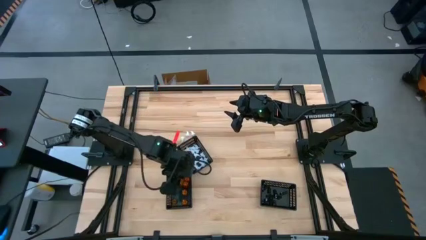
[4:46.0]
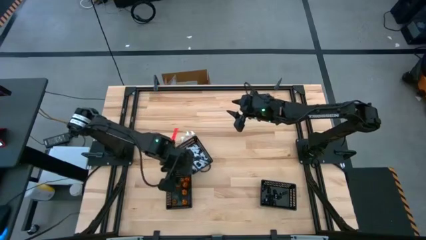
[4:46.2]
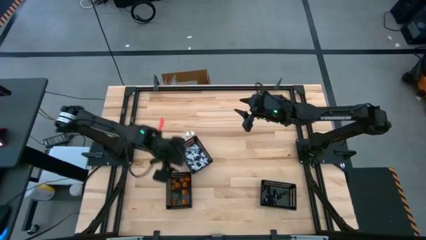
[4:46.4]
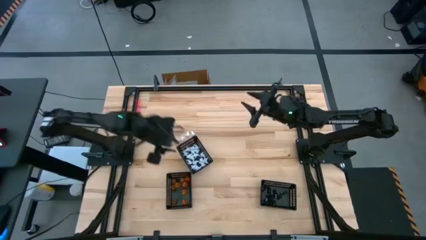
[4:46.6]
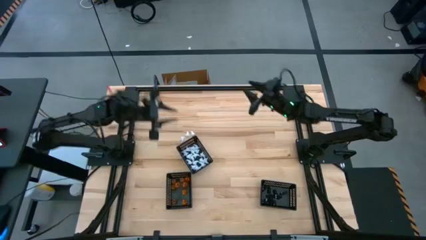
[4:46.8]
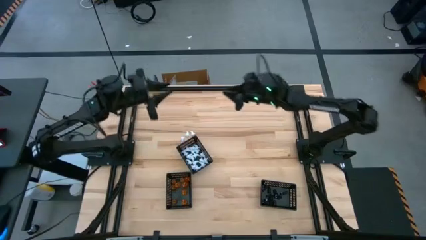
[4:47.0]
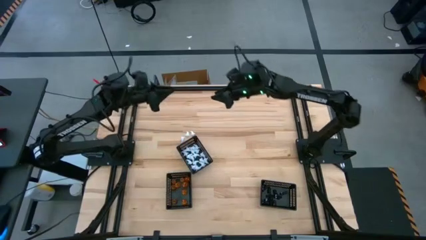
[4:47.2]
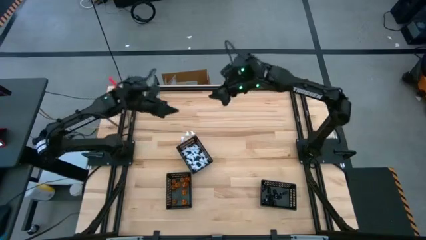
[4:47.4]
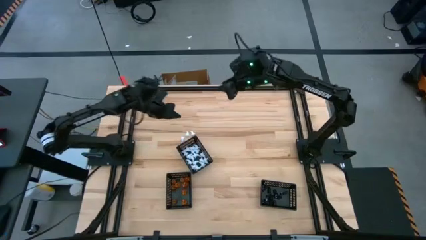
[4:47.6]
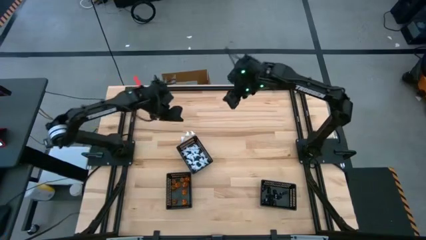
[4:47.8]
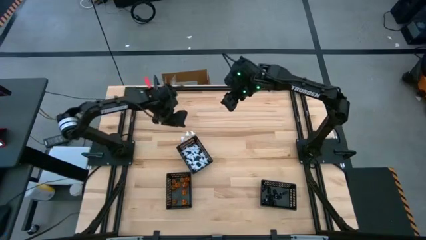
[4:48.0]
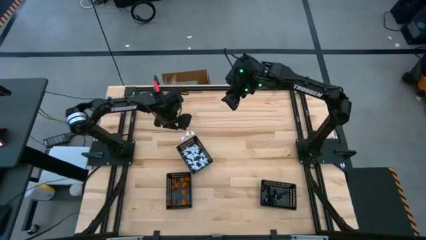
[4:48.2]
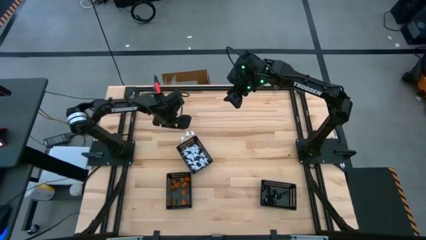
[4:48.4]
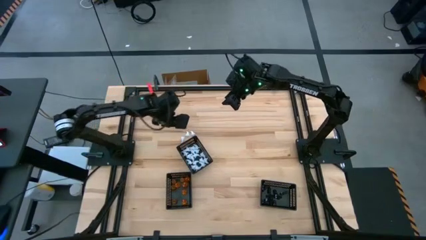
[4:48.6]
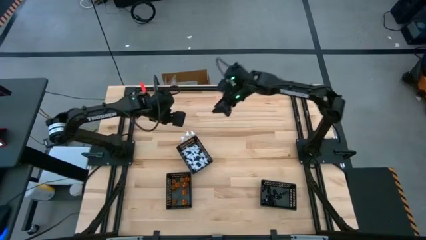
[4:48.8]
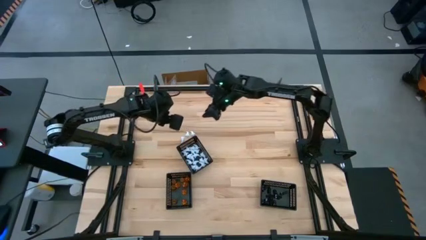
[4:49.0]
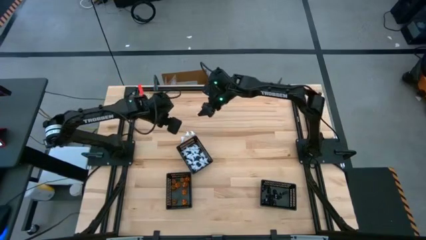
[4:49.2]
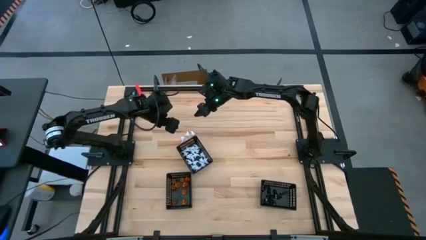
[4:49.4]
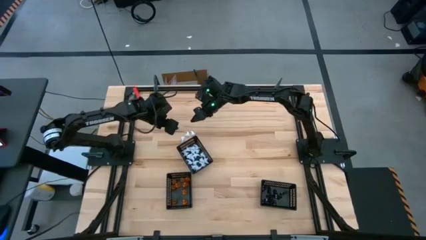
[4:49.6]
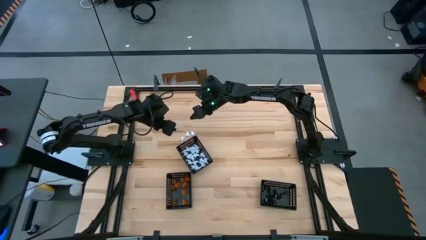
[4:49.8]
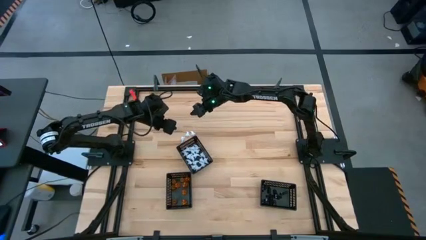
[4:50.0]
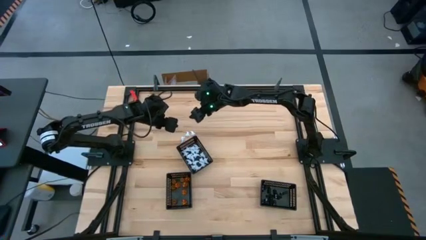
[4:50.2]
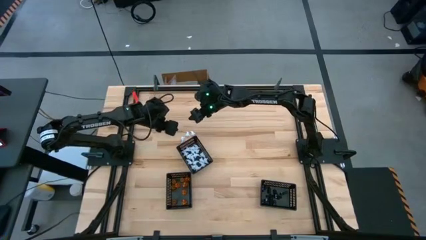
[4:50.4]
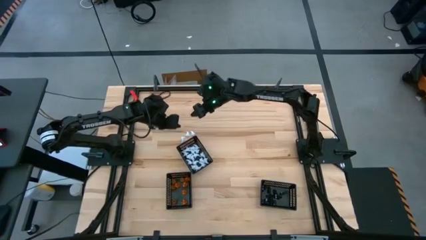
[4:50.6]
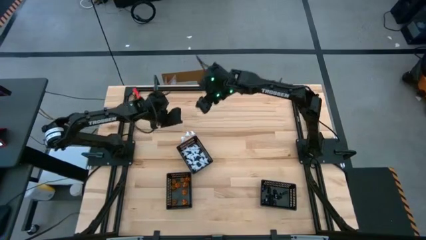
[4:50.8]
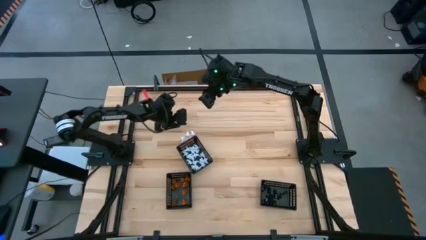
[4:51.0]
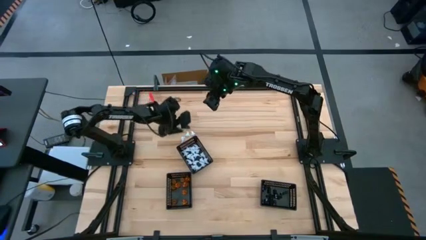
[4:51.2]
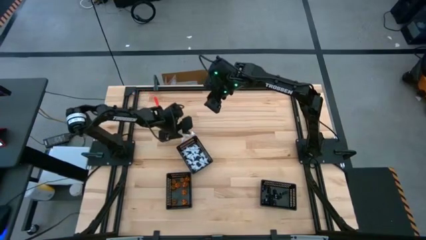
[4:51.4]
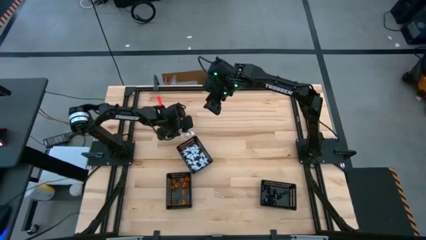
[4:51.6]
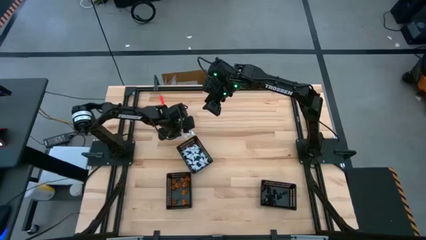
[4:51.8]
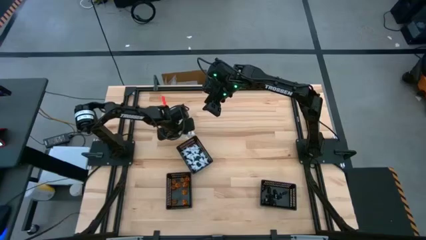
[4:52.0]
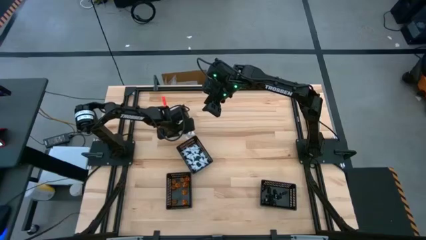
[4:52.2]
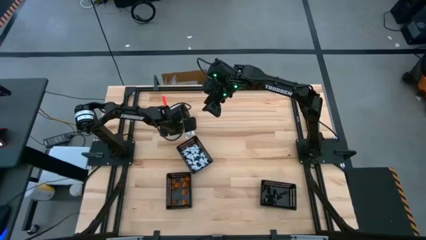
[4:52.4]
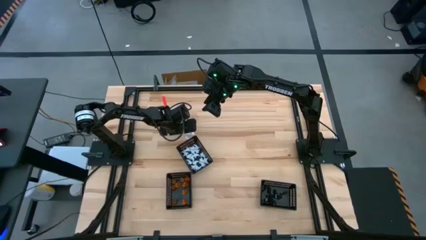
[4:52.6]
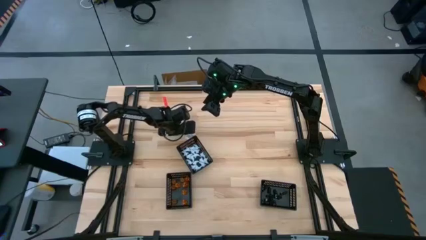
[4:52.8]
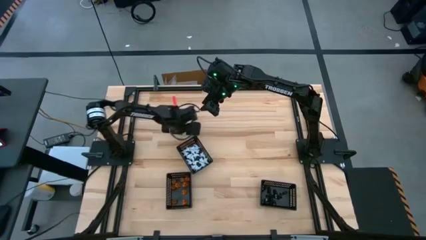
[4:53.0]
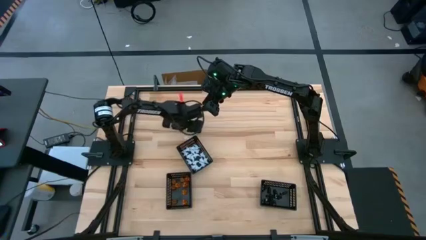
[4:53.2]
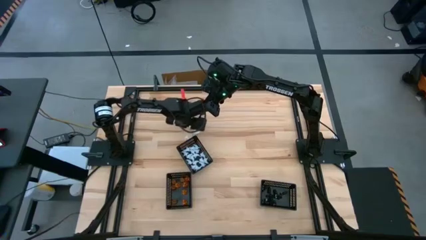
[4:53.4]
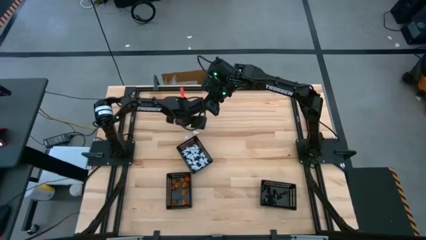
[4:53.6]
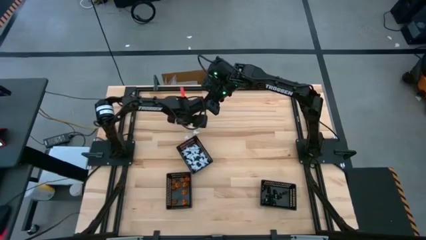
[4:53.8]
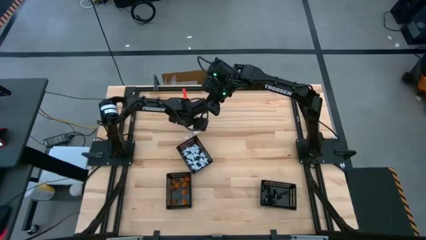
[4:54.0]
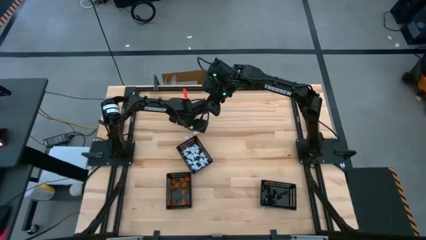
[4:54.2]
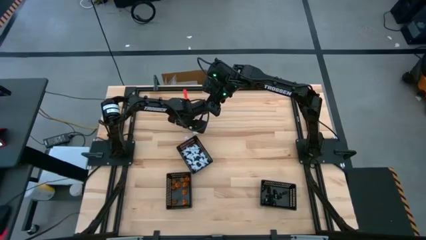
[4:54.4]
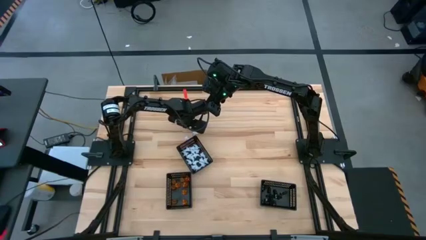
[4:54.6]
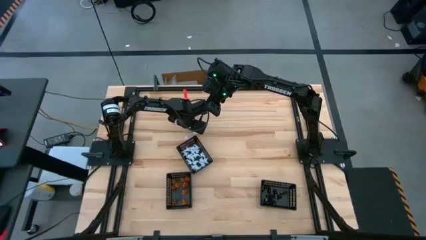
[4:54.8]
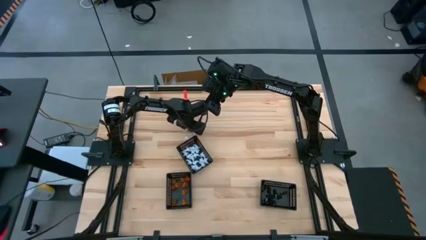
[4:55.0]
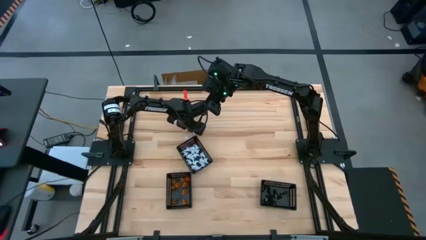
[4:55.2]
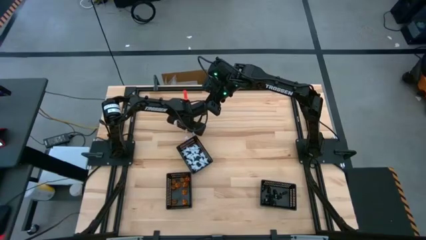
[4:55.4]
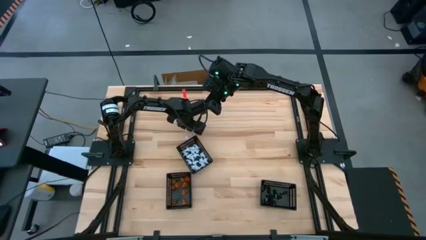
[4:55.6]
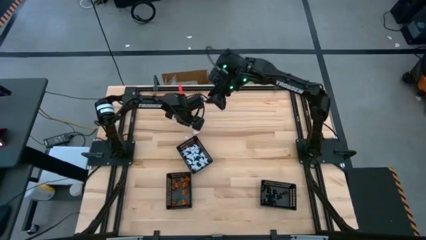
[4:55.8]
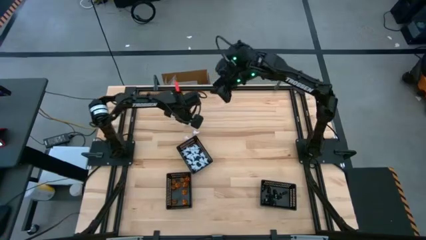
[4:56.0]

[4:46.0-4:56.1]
Task: Sort Halloween decoration
Put the white ghost toy into the middle black basket

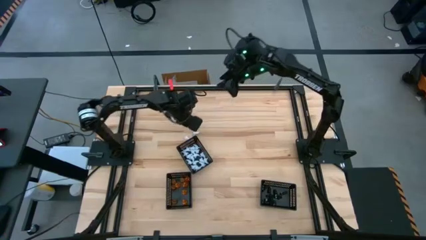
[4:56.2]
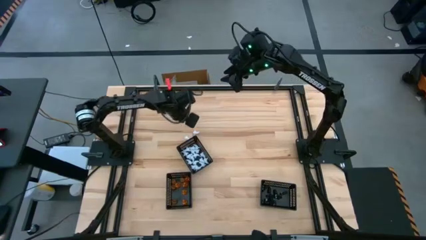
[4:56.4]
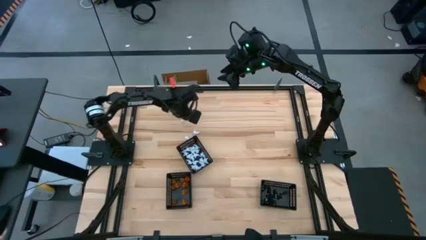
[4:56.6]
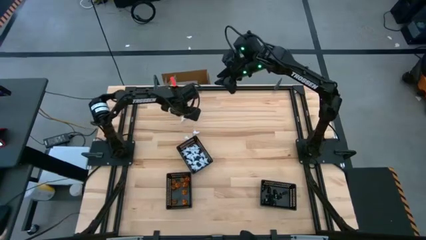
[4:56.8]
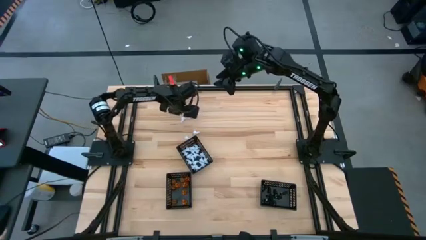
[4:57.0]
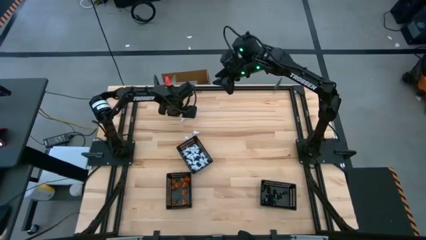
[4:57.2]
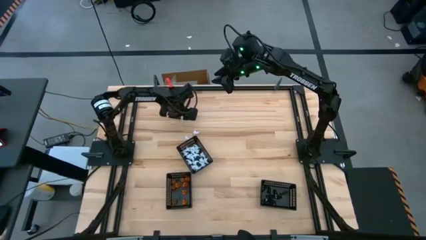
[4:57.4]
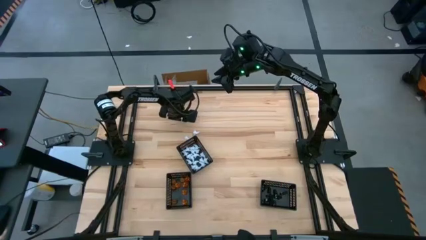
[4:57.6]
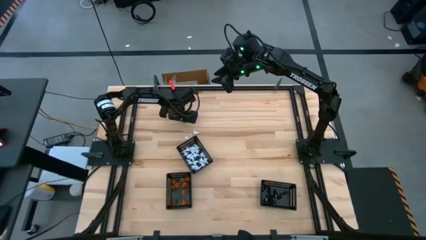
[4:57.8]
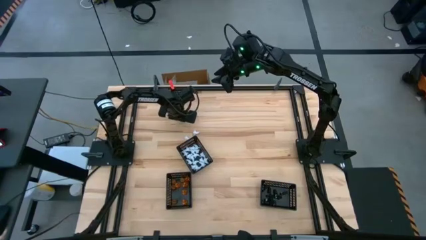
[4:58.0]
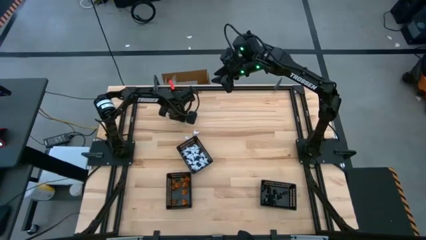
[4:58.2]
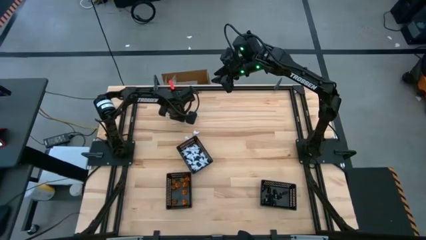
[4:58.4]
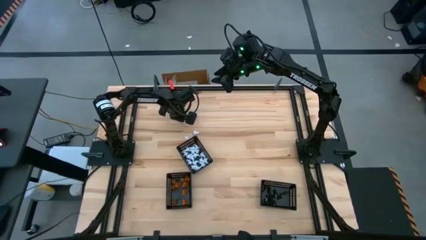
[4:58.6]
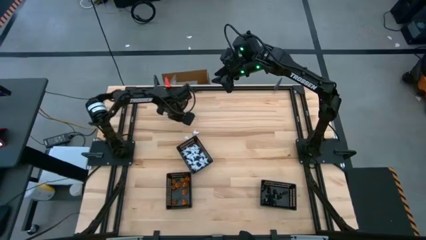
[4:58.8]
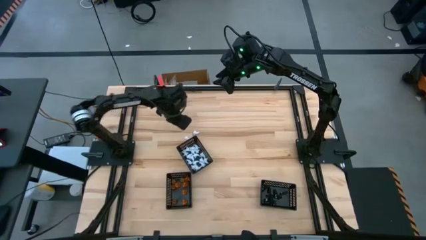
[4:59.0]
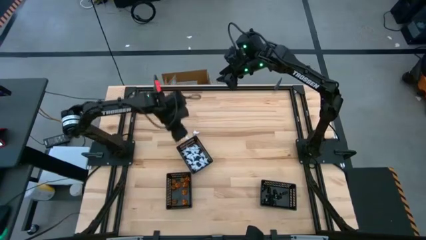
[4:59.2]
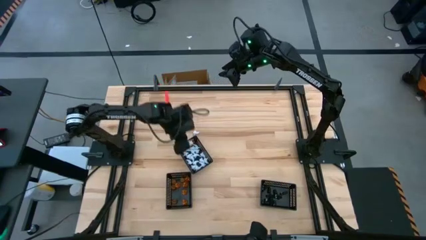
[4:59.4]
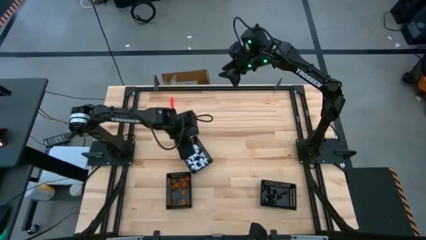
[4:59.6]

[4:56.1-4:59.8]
Put the white ghost toy into the middle black basket
